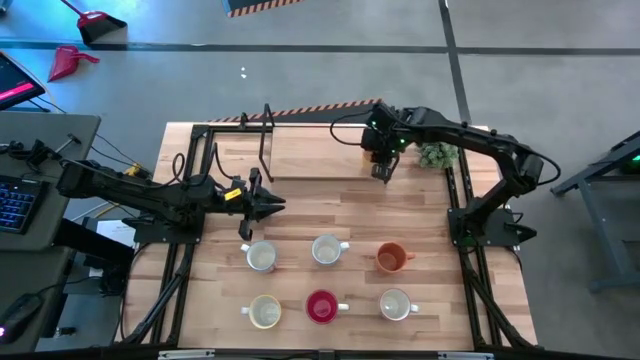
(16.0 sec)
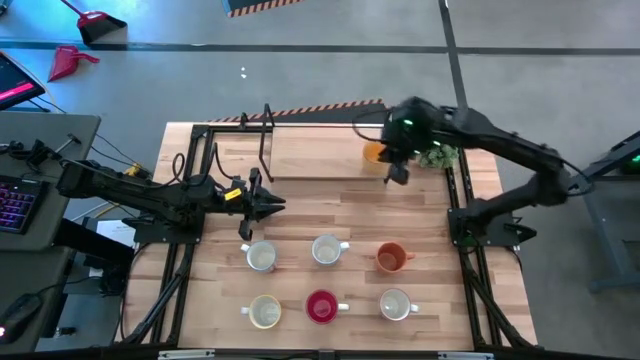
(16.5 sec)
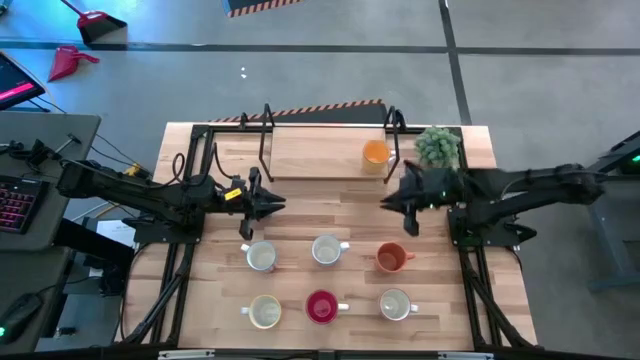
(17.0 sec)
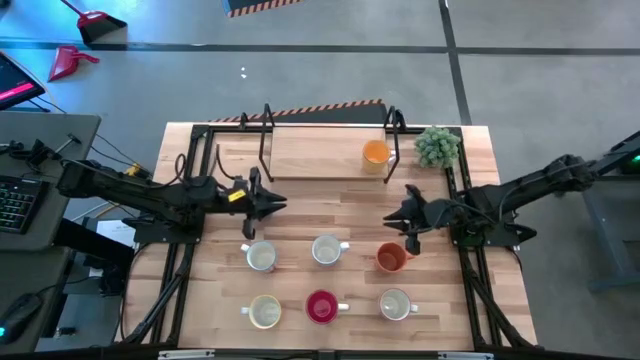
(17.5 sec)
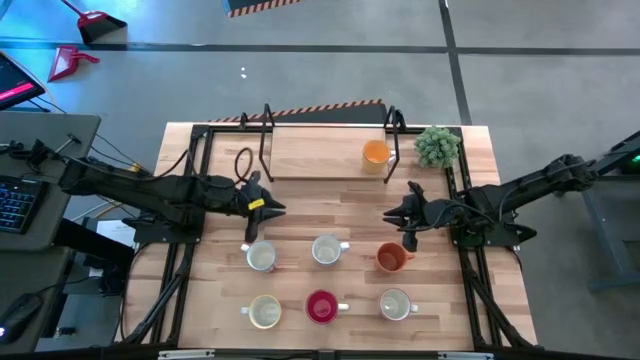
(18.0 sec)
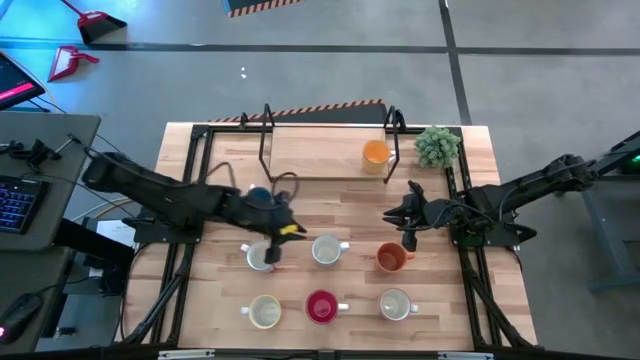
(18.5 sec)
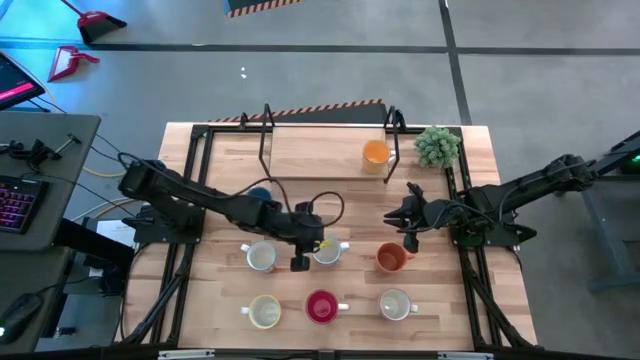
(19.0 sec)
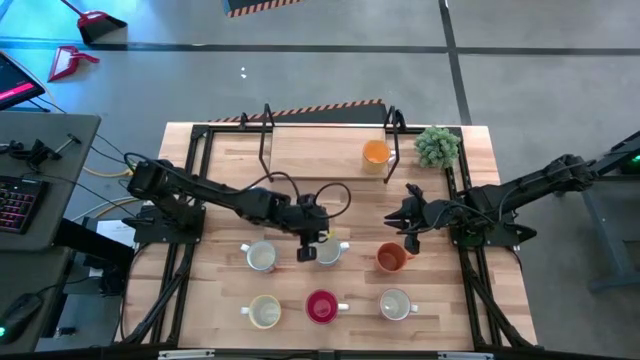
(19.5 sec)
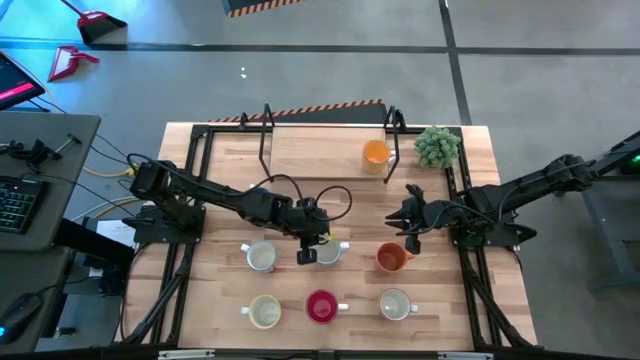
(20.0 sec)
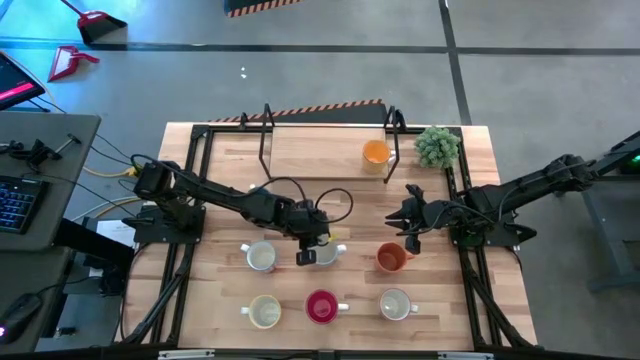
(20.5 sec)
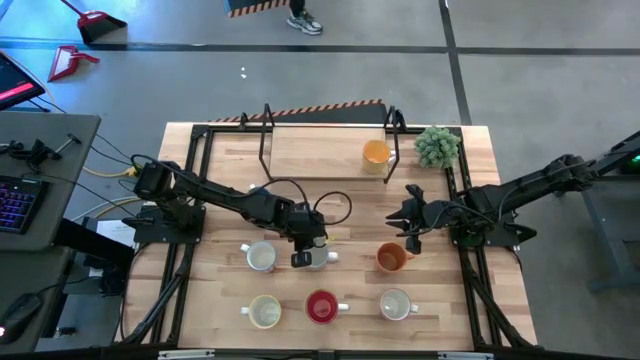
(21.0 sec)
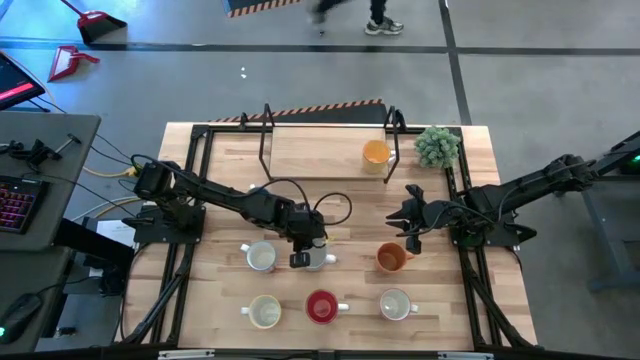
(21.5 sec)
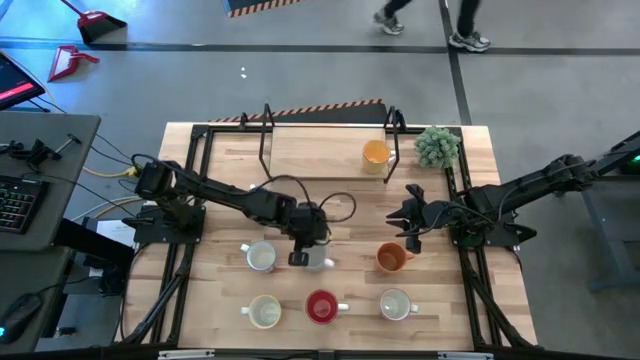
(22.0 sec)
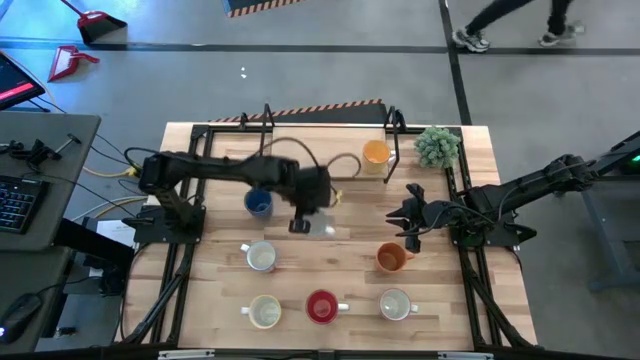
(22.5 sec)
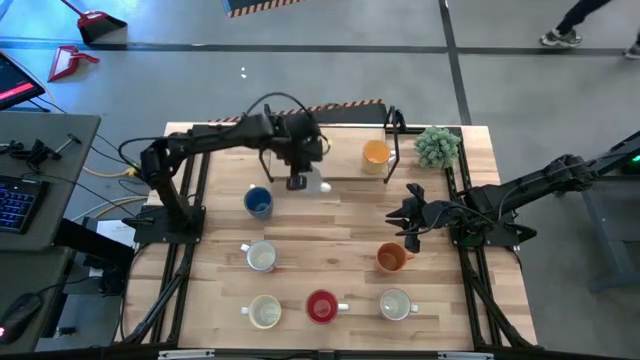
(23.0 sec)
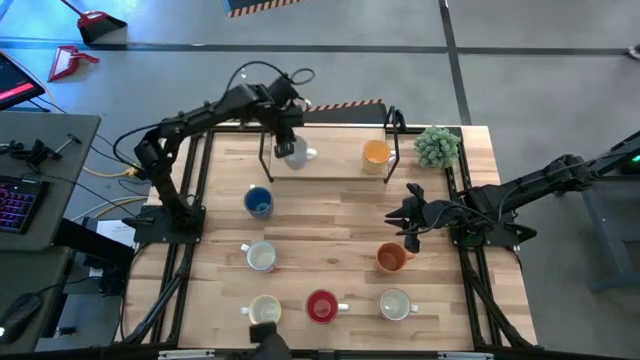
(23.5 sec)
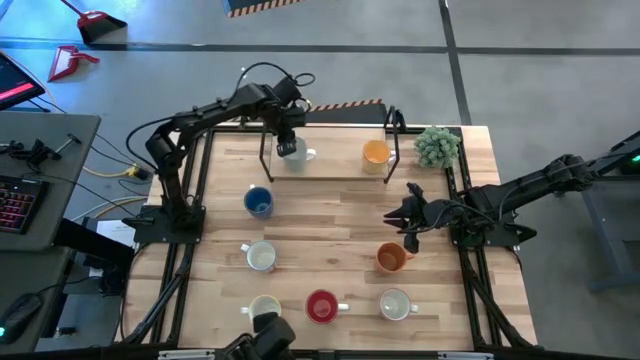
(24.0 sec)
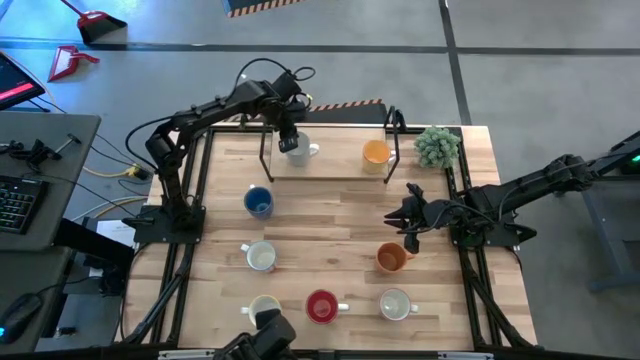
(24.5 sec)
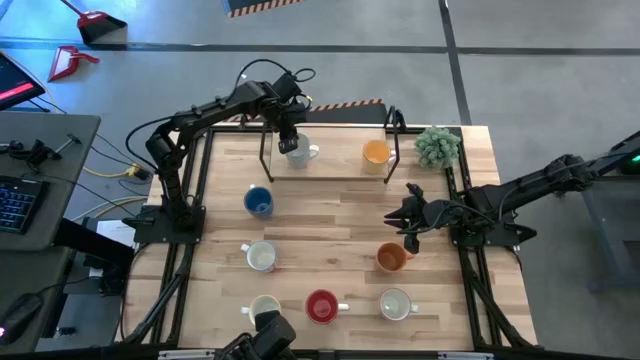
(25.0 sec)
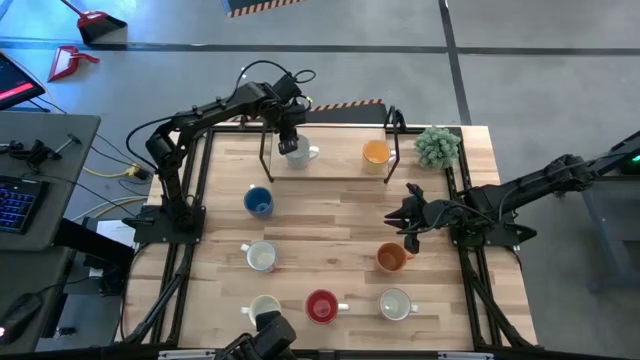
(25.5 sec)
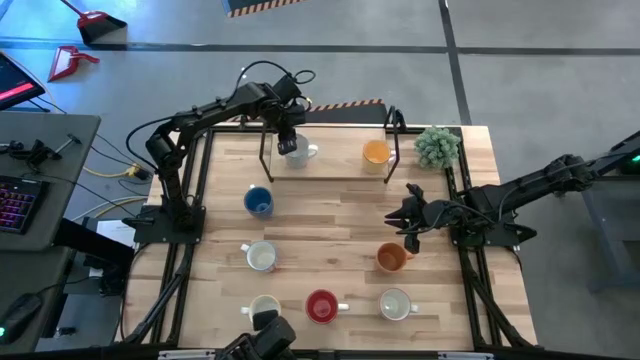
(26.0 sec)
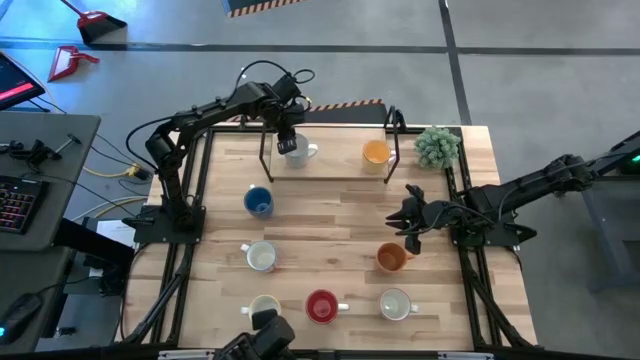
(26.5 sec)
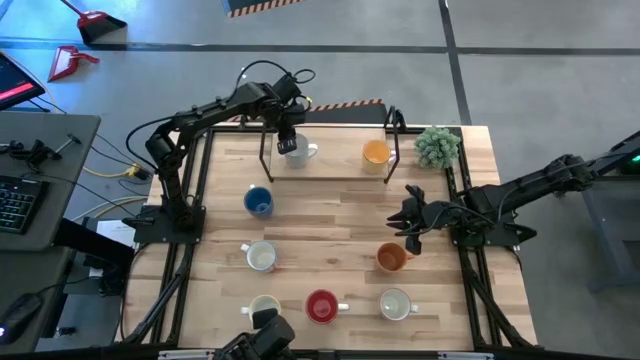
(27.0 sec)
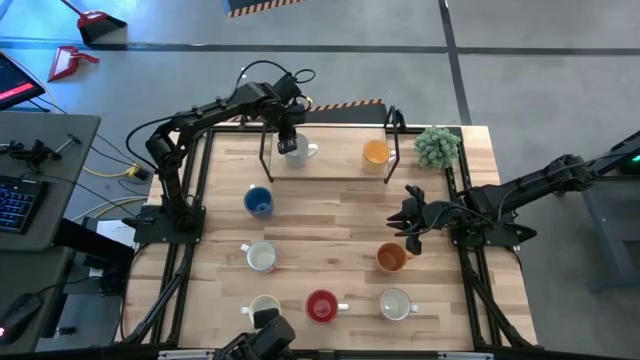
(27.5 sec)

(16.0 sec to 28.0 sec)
Task: Place coffee mugs
Put the white blue mug on the shelf

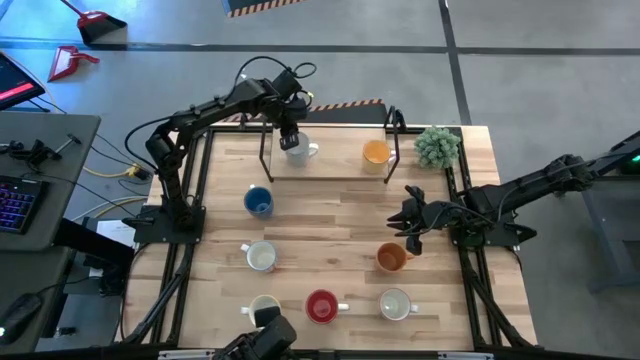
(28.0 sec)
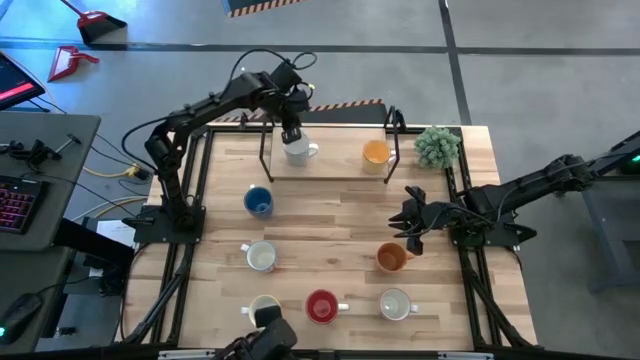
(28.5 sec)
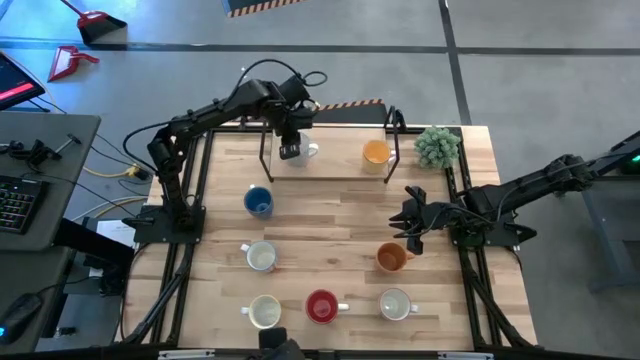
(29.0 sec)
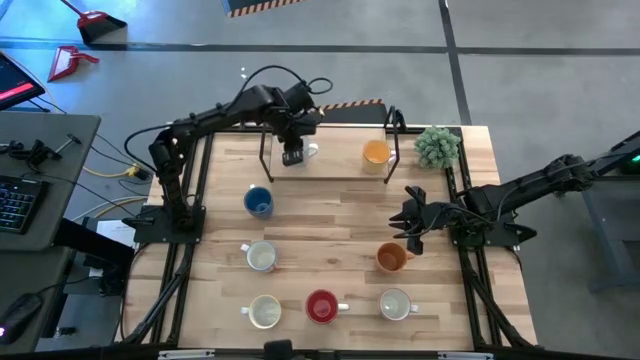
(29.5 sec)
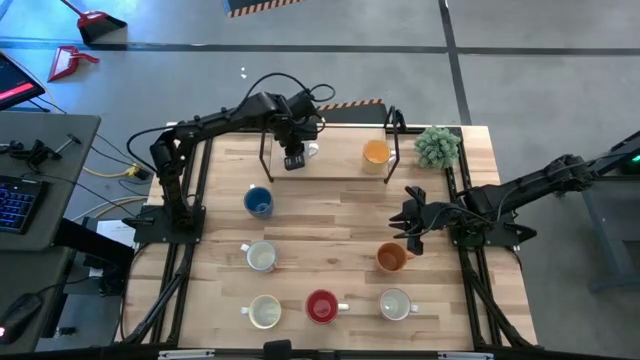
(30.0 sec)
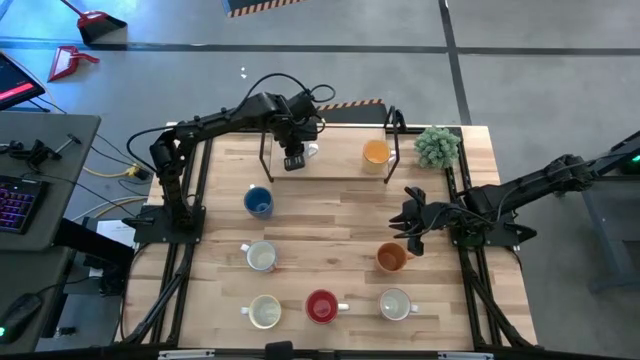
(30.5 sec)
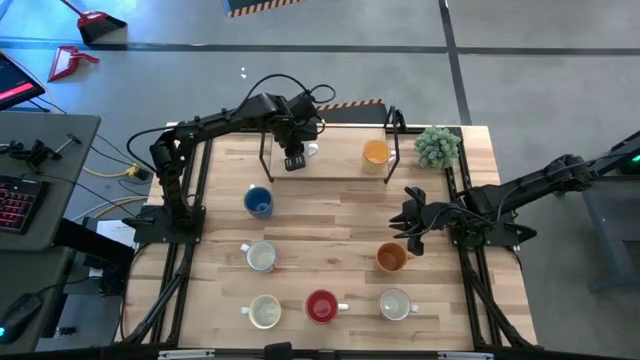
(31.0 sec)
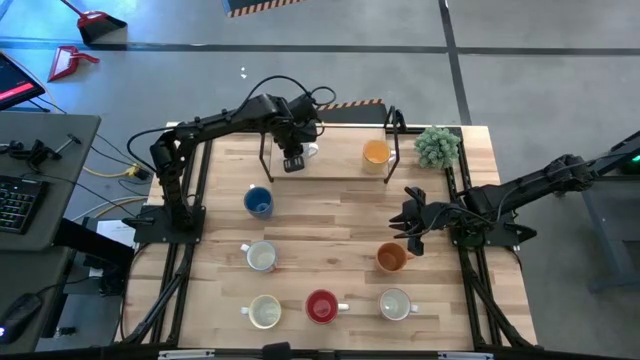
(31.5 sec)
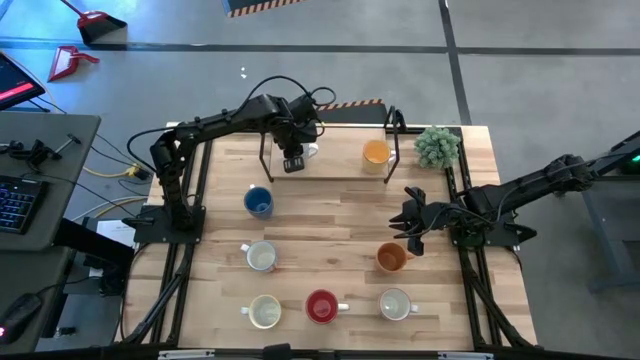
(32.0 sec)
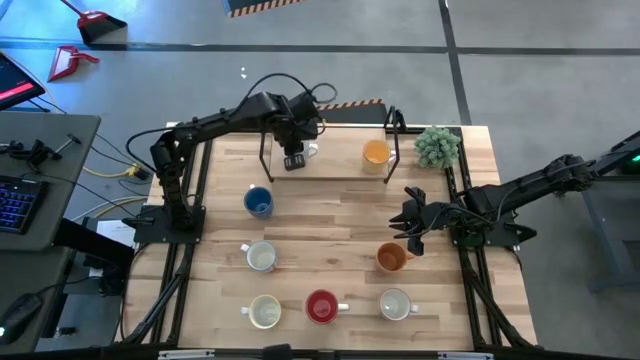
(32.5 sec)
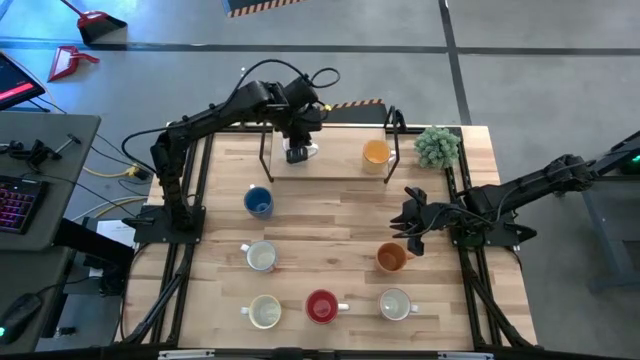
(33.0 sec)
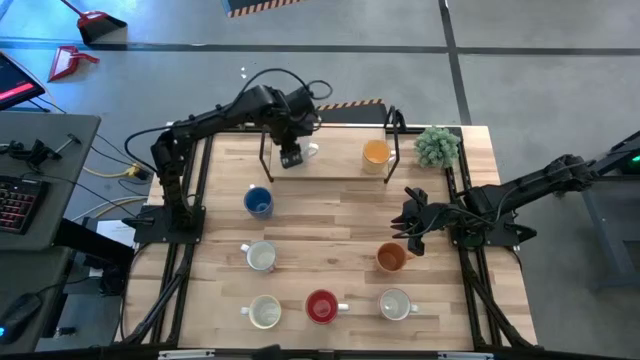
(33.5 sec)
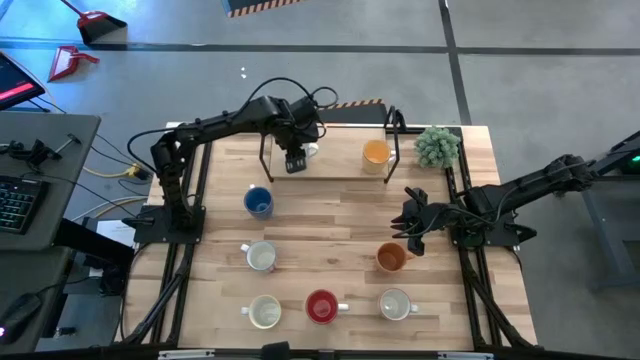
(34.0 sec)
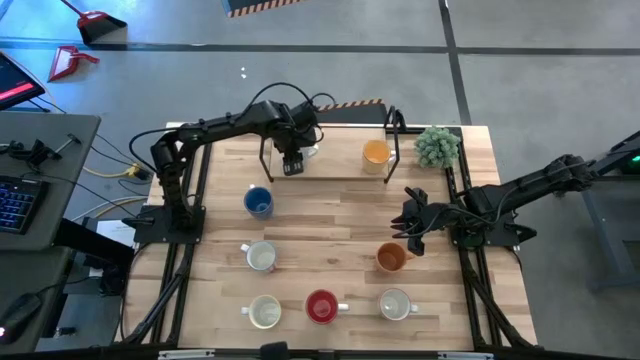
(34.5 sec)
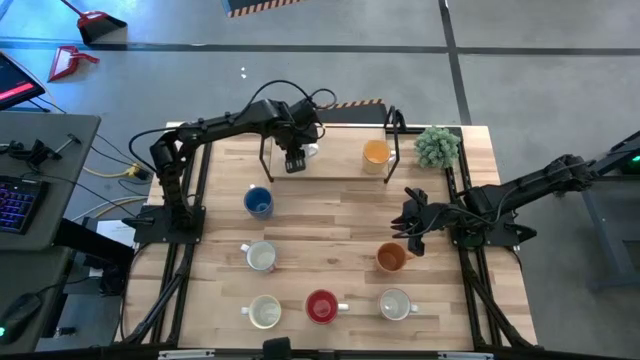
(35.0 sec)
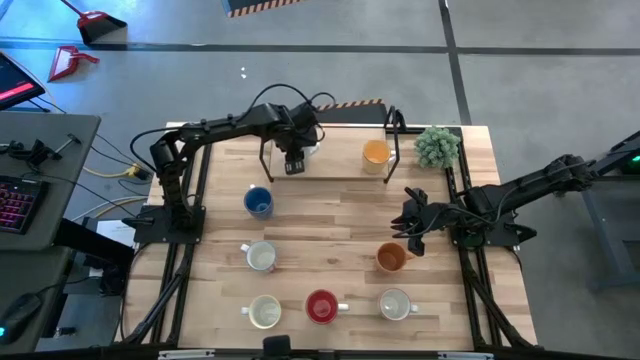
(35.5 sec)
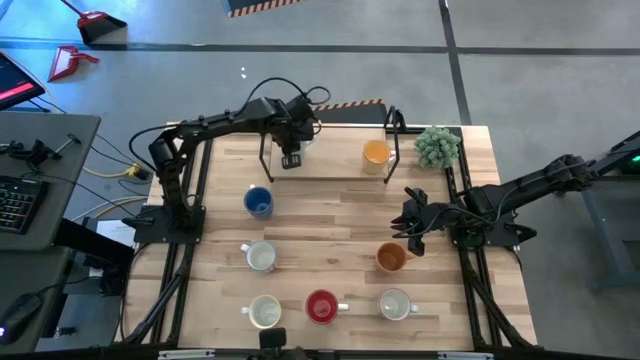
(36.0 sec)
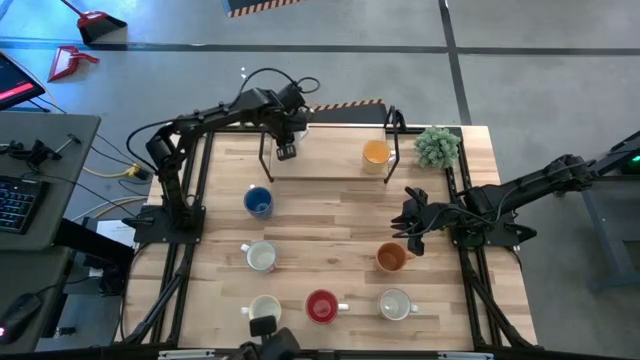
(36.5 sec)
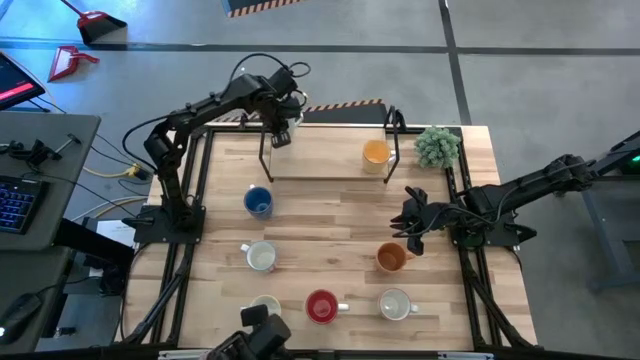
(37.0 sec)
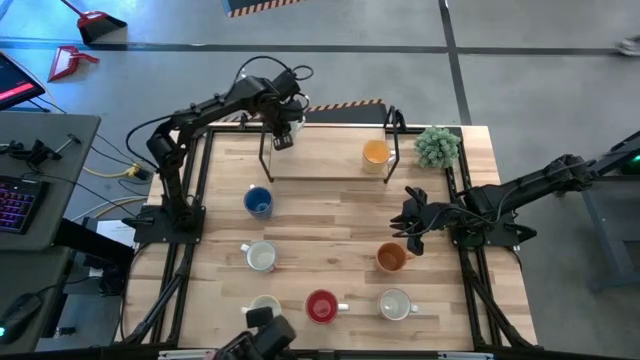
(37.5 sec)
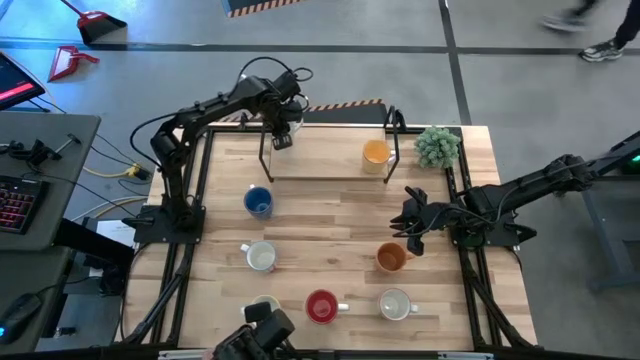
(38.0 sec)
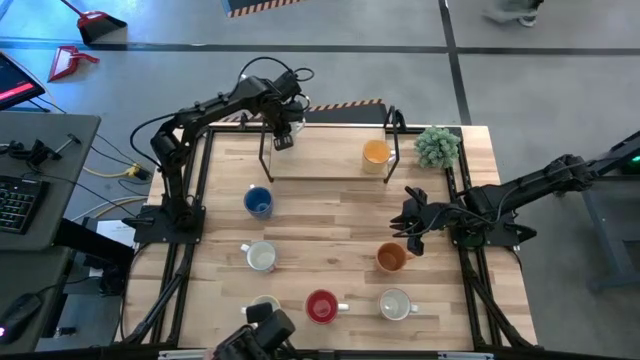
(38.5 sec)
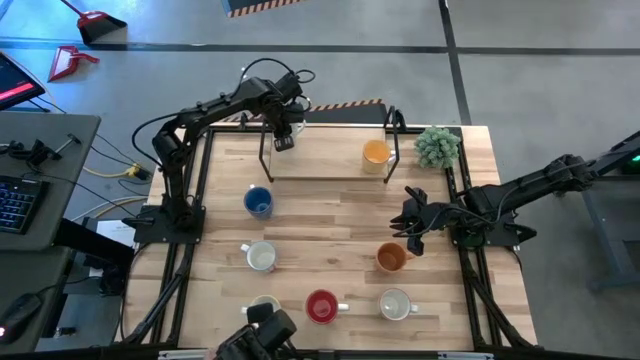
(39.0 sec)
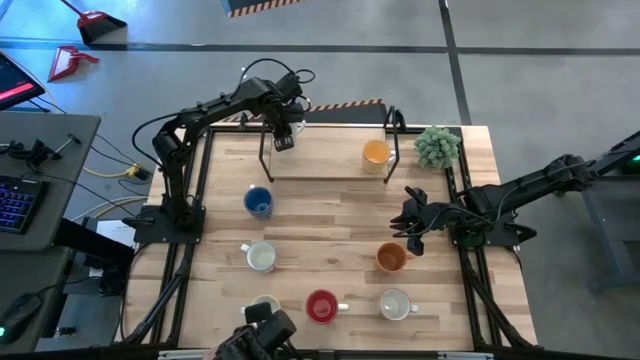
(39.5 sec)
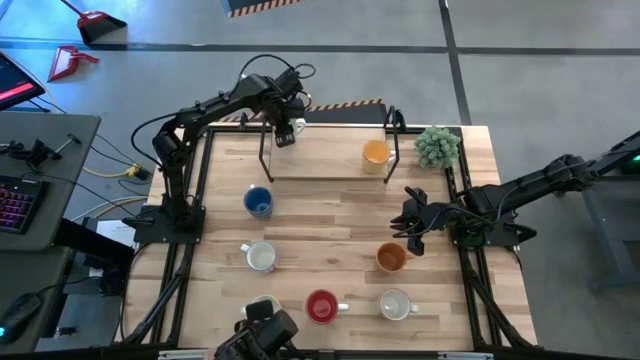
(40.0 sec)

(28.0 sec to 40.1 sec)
Put the white blue mug on the shelf
